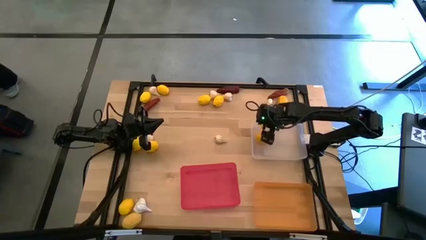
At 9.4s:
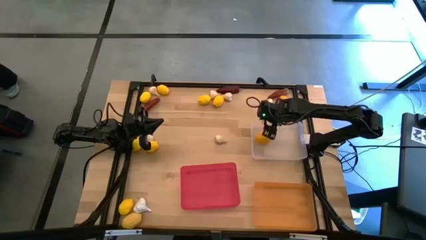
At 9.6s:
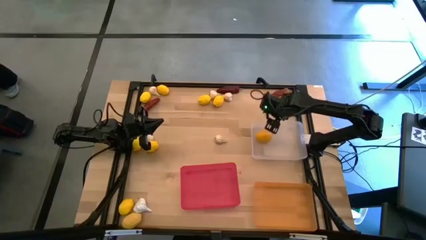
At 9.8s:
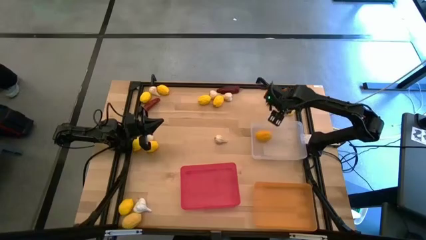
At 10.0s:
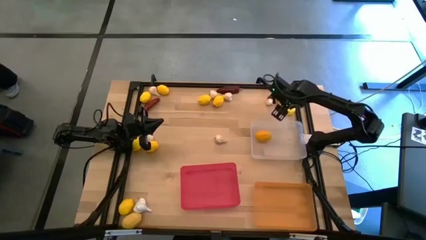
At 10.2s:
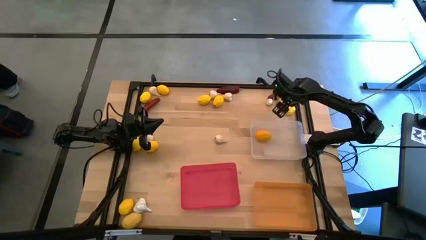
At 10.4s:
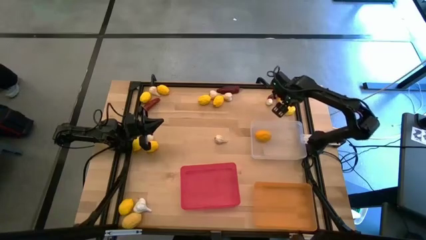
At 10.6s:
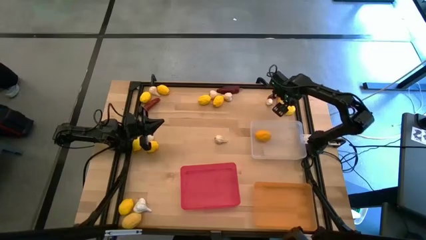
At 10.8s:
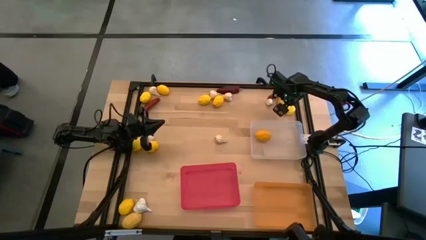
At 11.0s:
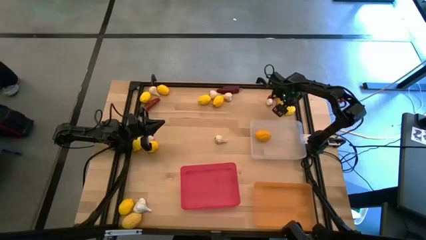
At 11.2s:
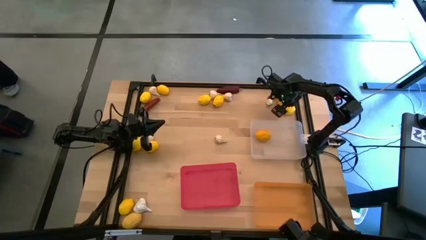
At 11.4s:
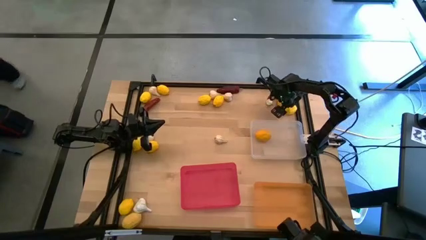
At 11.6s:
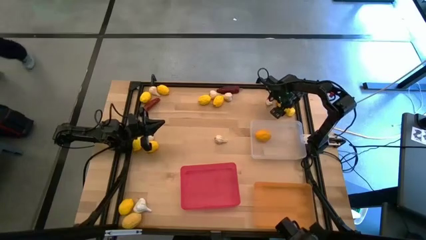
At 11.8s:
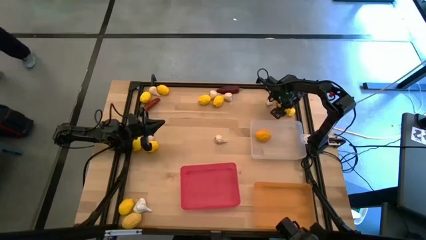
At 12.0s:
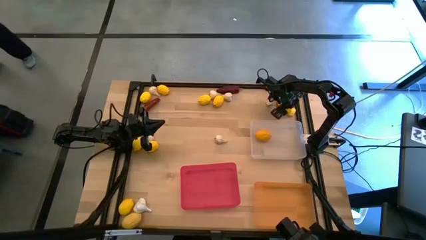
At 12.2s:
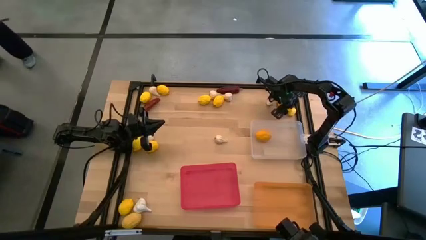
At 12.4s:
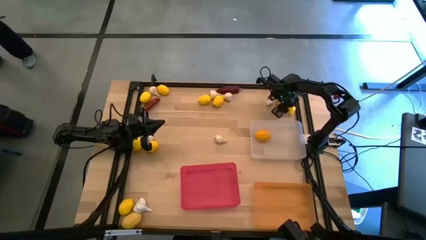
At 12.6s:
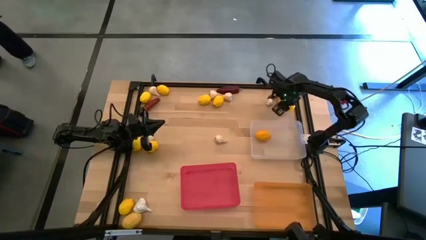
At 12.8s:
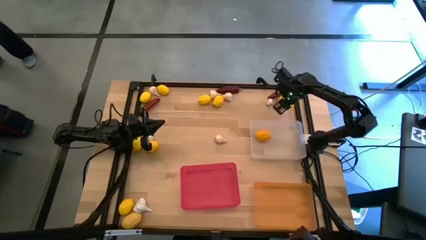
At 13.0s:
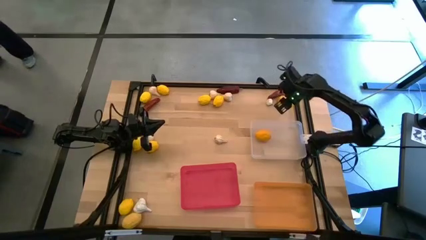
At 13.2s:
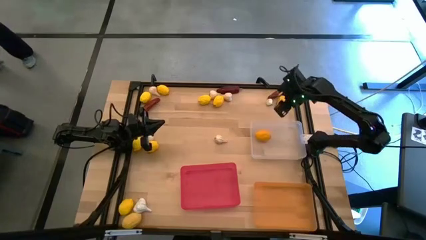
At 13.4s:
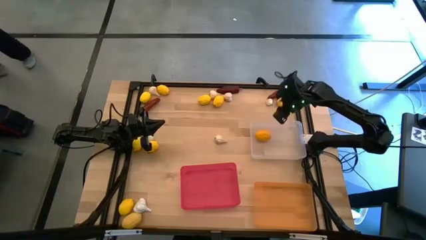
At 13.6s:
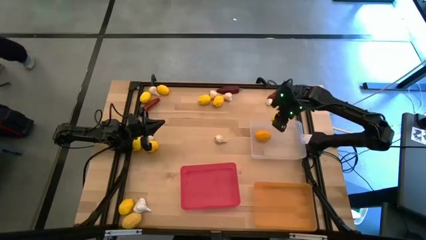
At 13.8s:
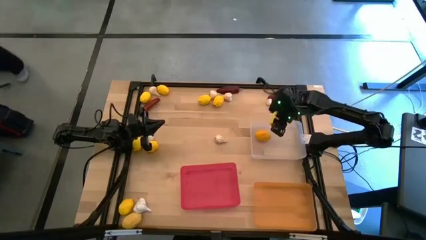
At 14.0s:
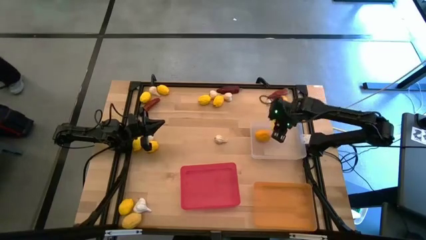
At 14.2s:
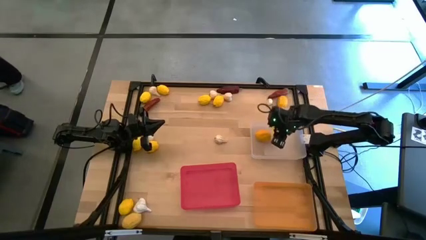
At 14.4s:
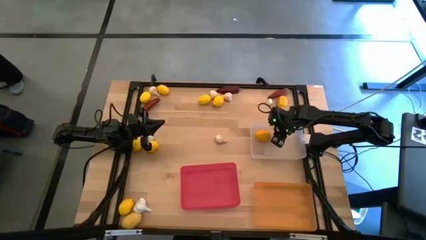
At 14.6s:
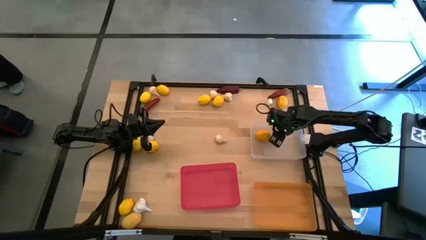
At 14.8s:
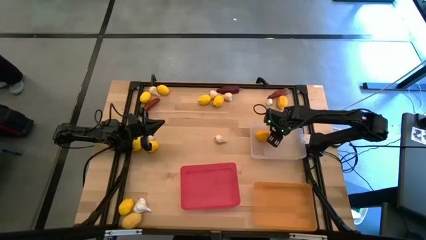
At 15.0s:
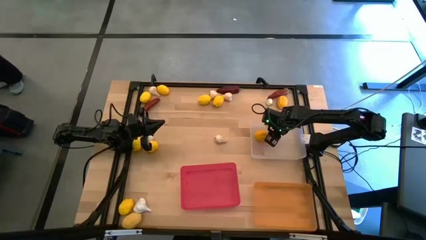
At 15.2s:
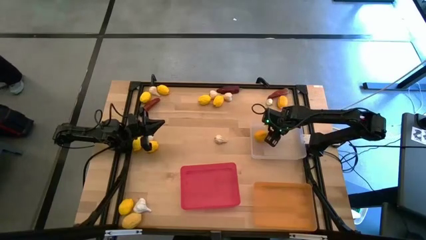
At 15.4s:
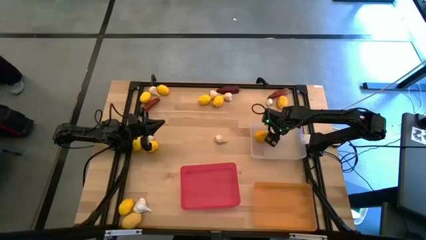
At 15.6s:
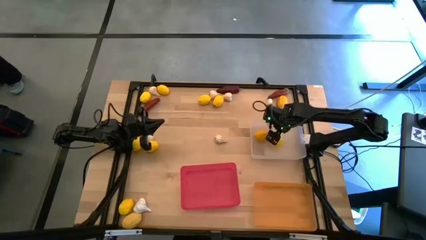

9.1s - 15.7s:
Task: Sort produce into baskets
Put the yellow lemon into the transparent bin

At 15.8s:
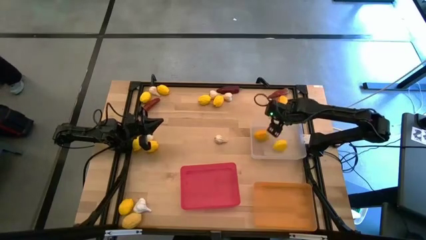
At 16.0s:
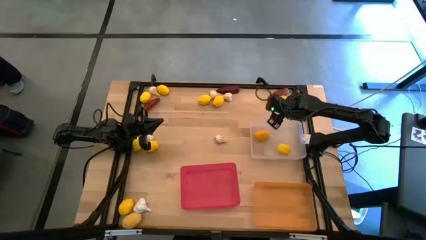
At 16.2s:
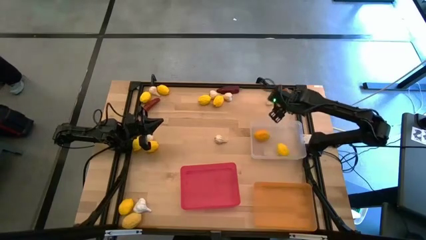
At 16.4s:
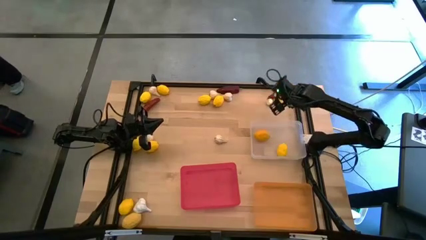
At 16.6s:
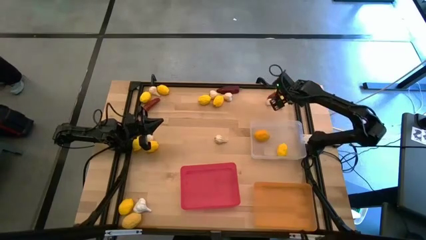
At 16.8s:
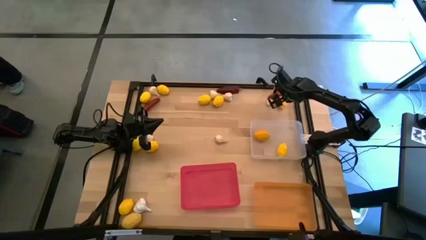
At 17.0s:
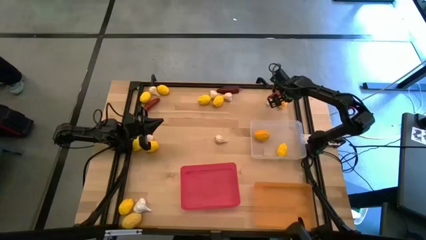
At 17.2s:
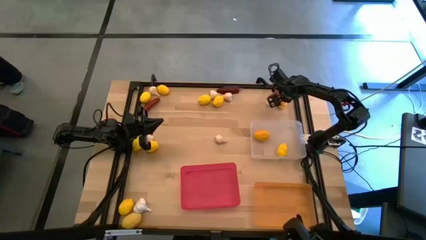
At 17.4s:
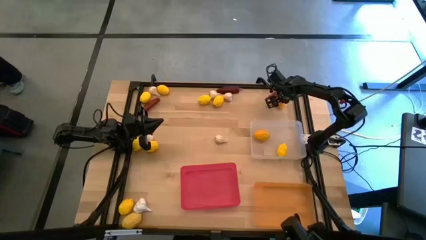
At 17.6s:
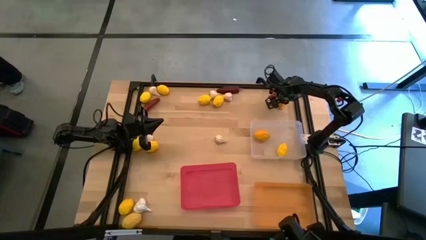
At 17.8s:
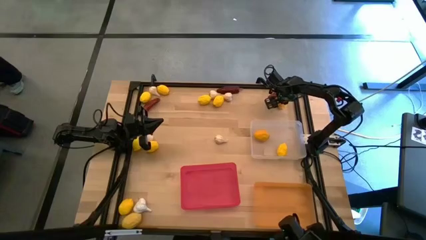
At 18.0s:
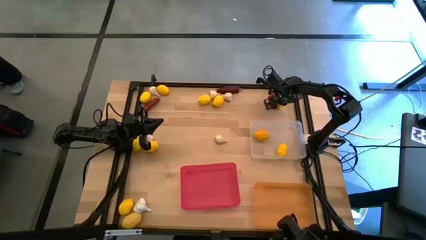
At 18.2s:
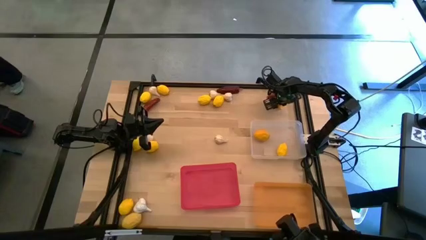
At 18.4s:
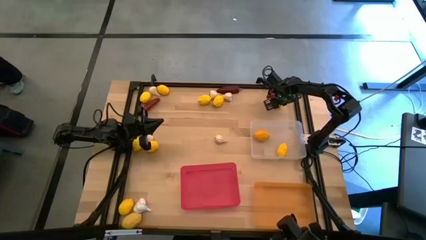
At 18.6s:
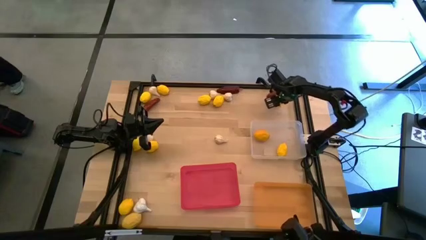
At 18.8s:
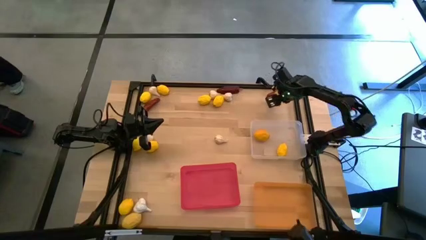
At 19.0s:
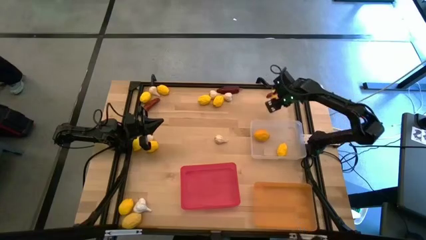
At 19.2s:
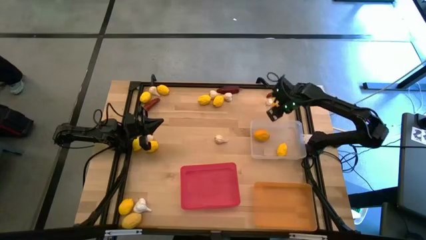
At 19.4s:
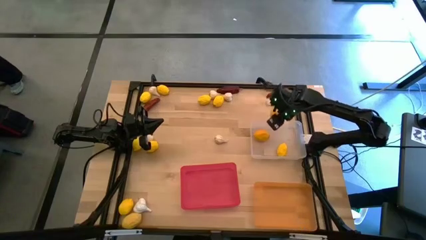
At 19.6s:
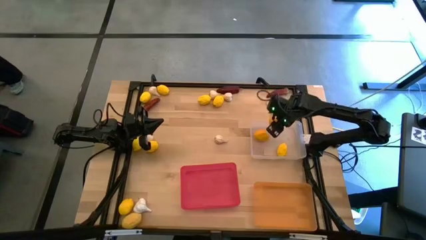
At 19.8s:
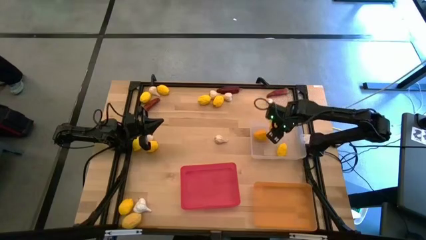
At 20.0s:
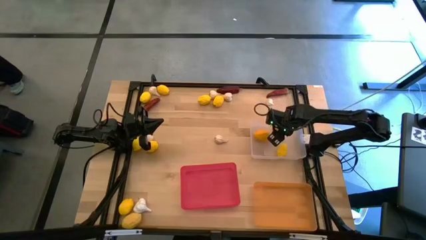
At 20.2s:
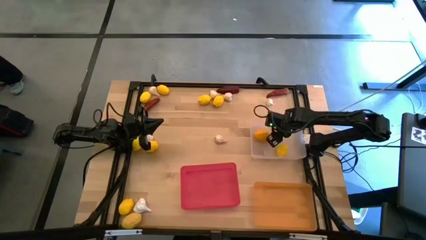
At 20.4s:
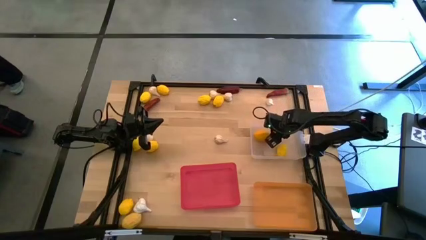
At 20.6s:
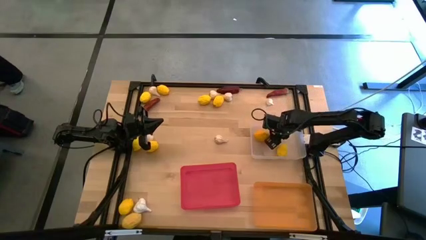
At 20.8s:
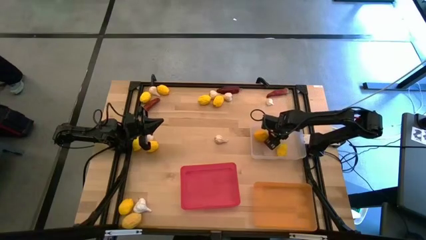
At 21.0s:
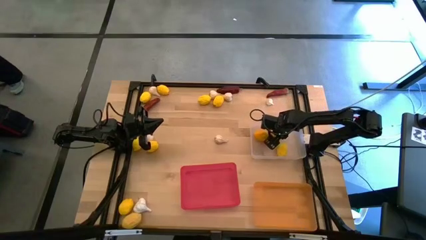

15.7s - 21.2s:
Put the yellow lemon into the transparent bin

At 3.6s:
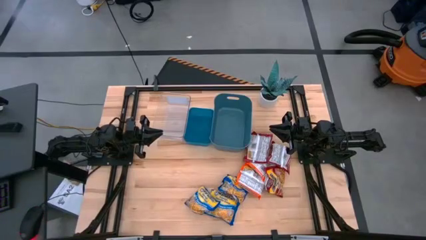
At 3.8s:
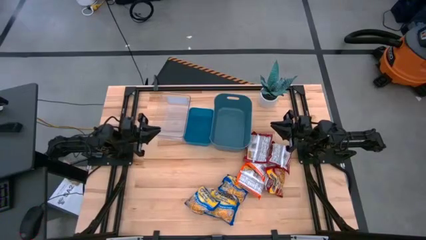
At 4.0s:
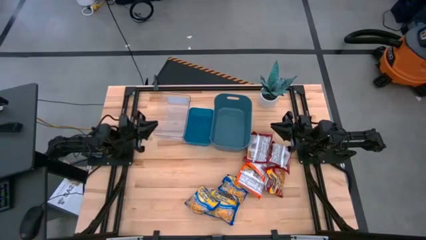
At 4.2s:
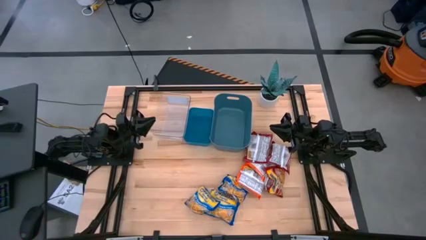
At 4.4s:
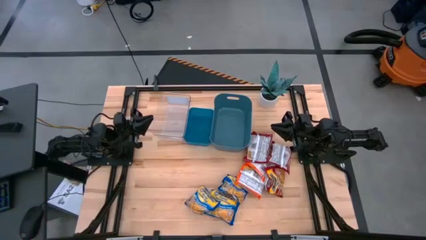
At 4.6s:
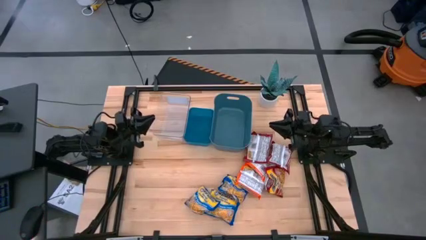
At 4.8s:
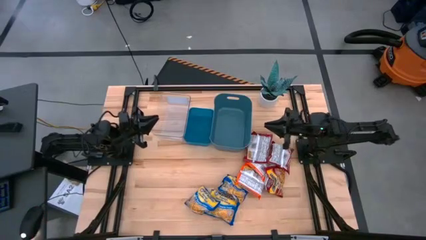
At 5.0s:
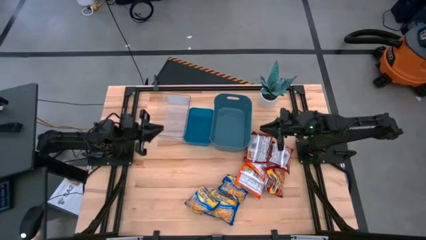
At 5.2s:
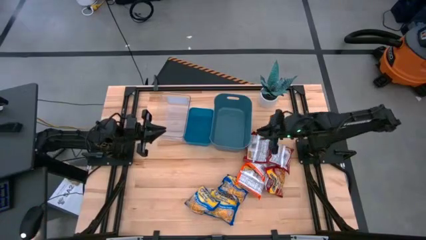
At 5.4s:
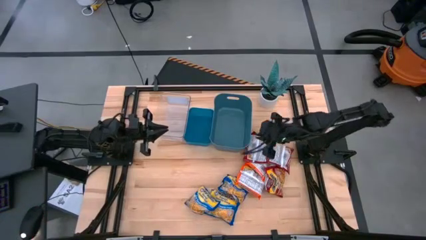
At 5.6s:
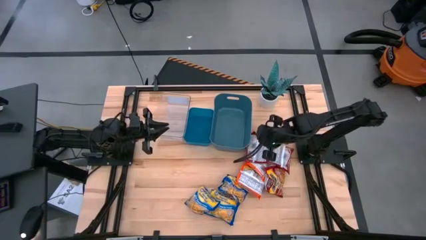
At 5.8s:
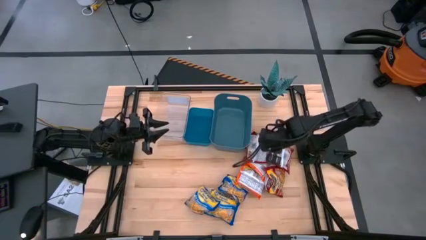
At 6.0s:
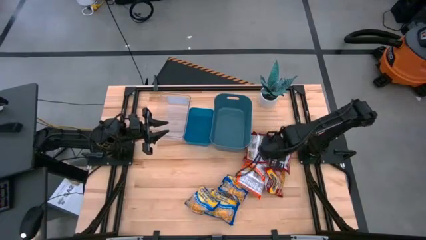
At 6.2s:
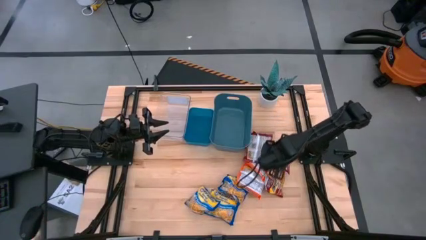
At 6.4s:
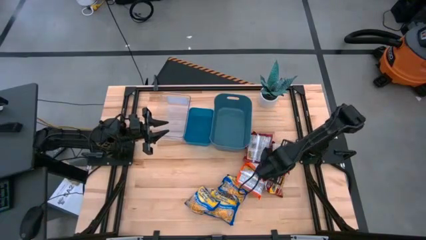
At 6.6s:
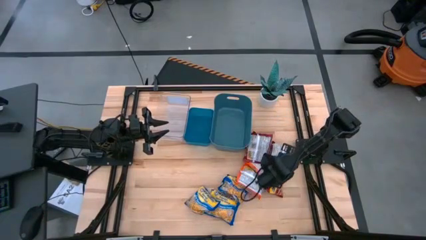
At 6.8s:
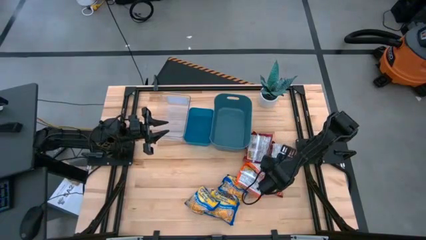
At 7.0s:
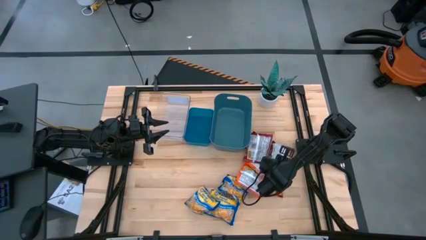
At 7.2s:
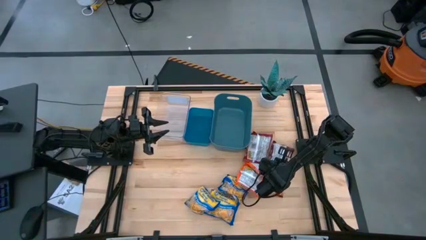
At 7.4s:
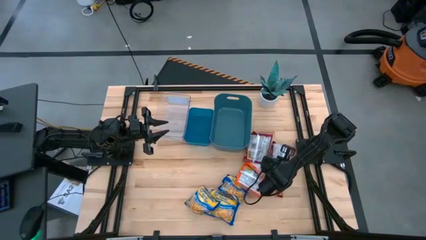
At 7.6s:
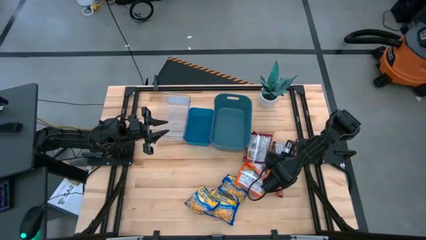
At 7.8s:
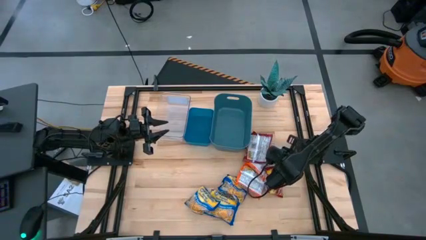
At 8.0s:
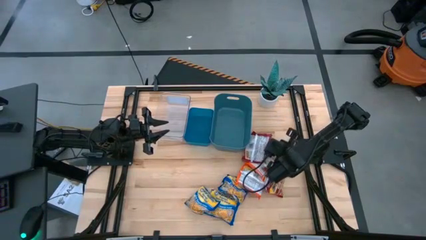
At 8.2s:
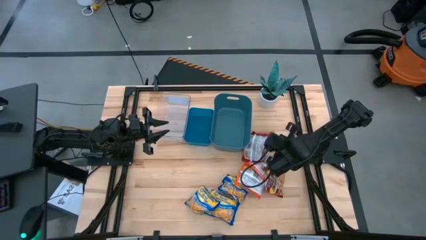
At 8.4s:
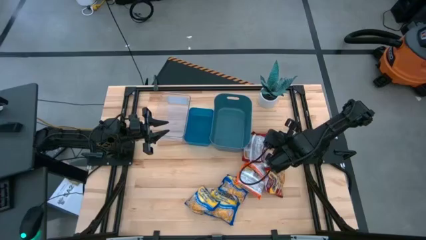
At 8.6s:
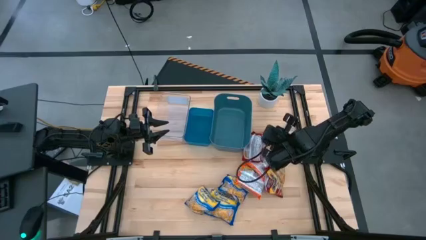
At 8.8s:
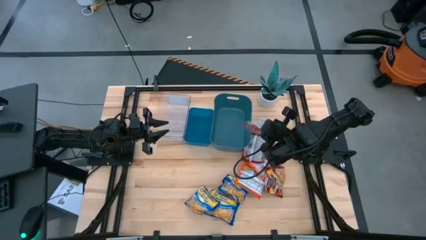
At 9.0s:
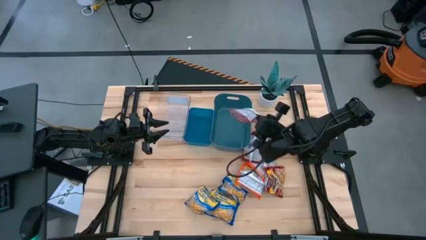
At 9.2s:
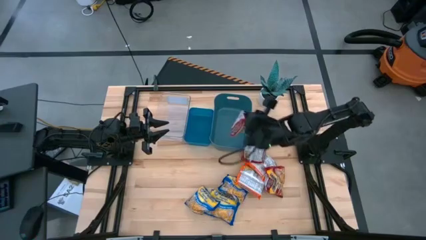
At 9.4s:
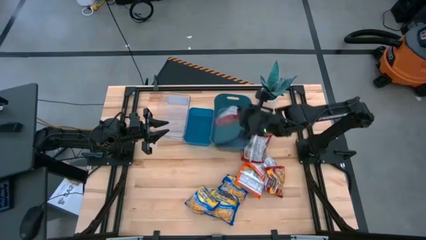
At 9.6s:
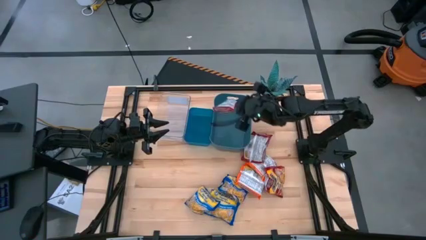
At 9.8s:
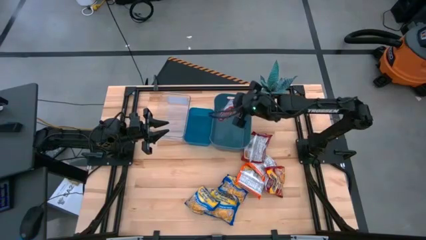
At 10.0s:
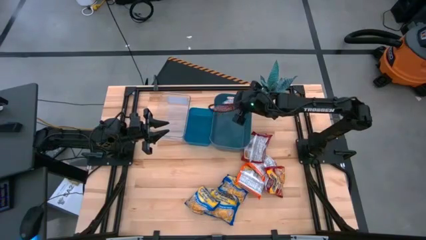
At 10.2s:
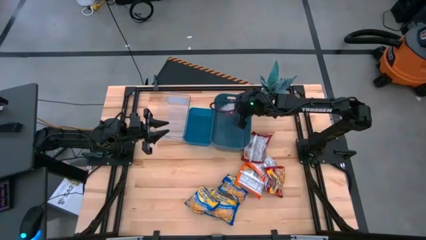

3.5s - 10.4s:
Task: Sort Maruchan noodles
Put the red noodle pack into the green bin
